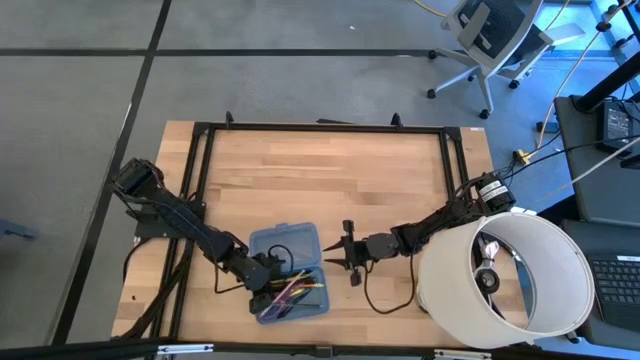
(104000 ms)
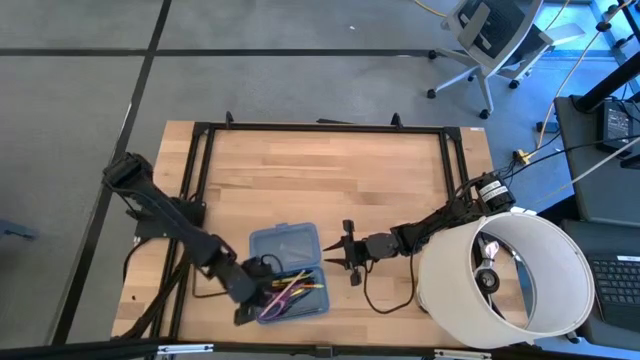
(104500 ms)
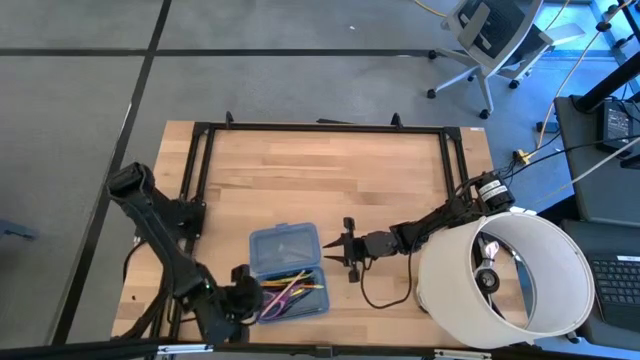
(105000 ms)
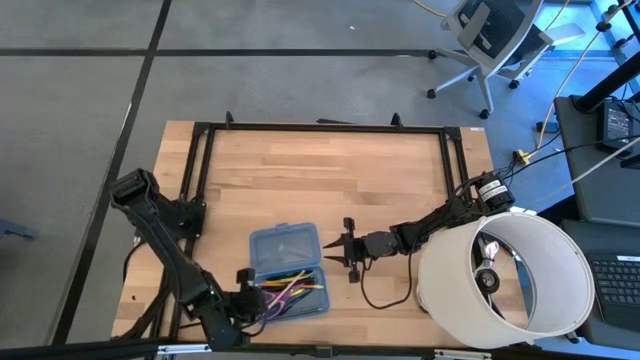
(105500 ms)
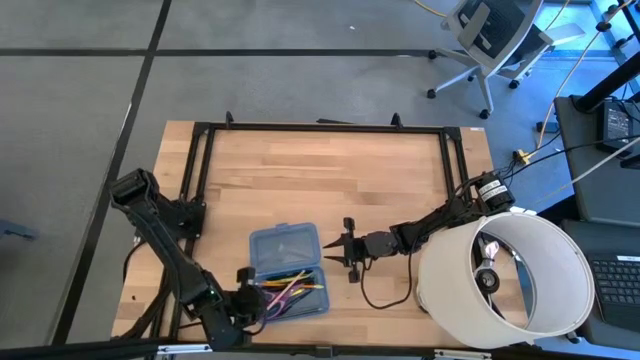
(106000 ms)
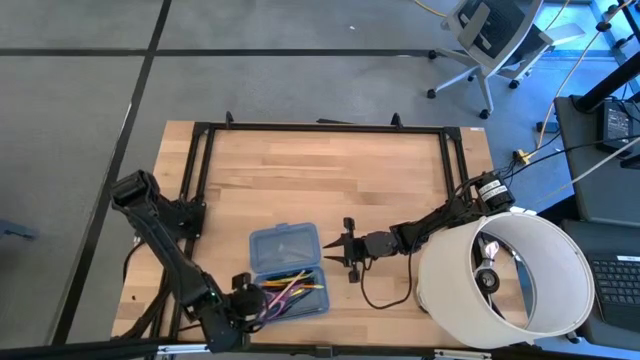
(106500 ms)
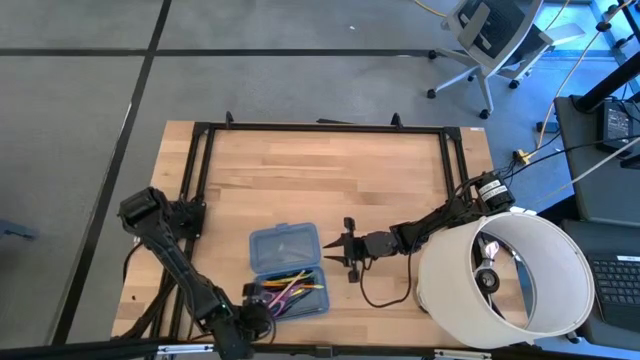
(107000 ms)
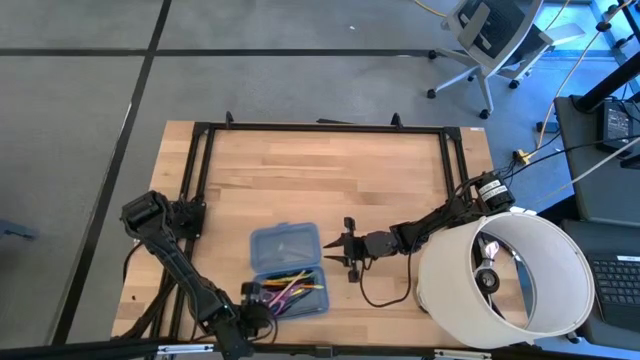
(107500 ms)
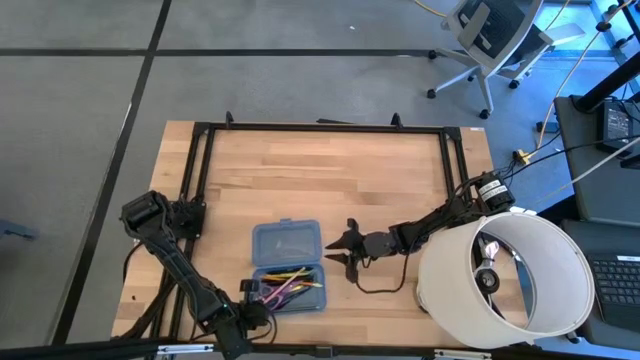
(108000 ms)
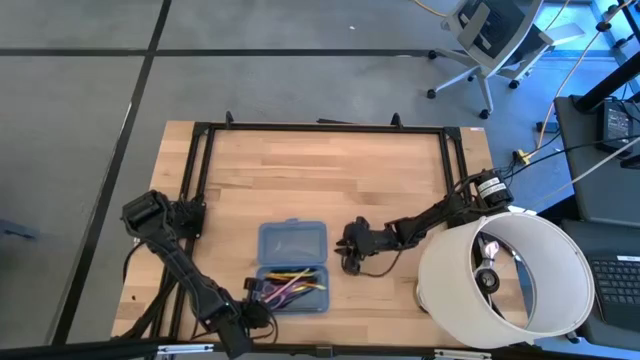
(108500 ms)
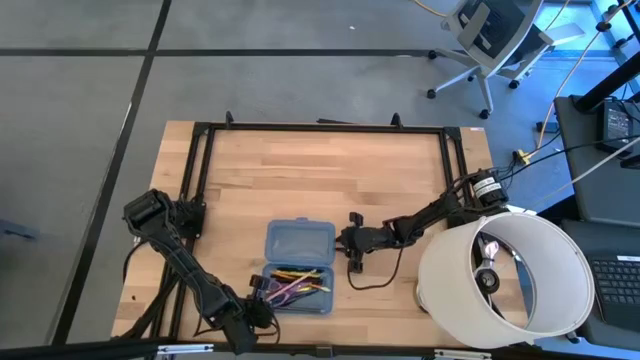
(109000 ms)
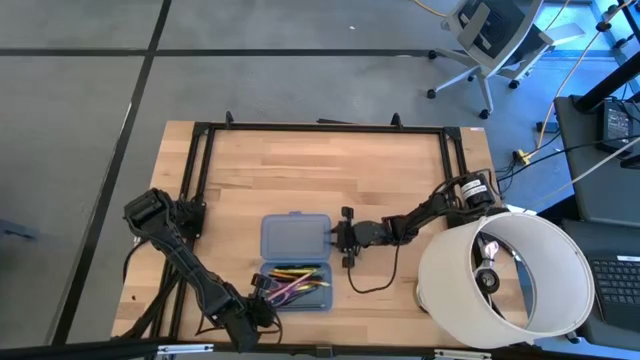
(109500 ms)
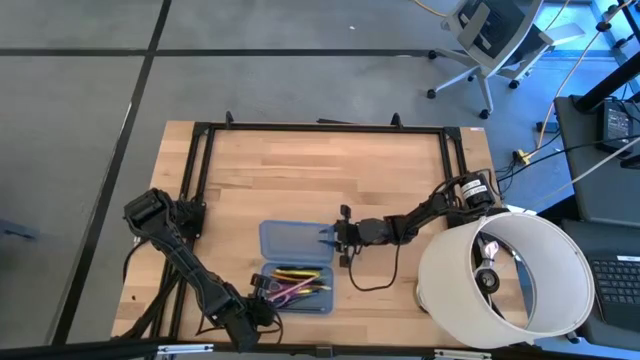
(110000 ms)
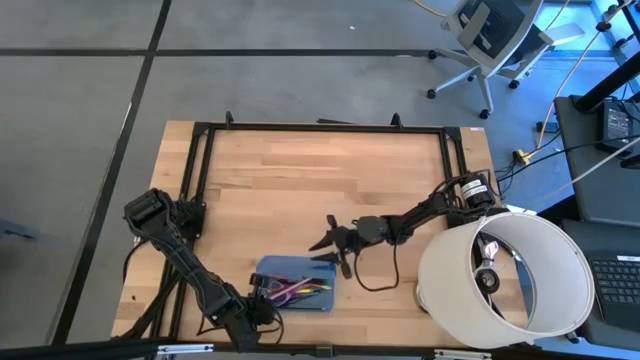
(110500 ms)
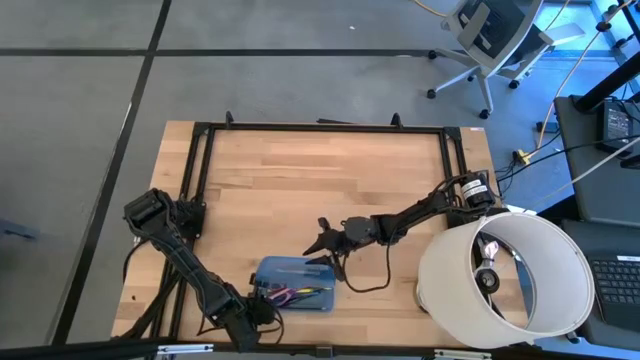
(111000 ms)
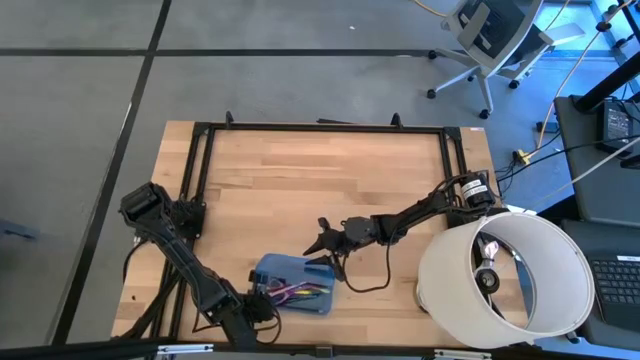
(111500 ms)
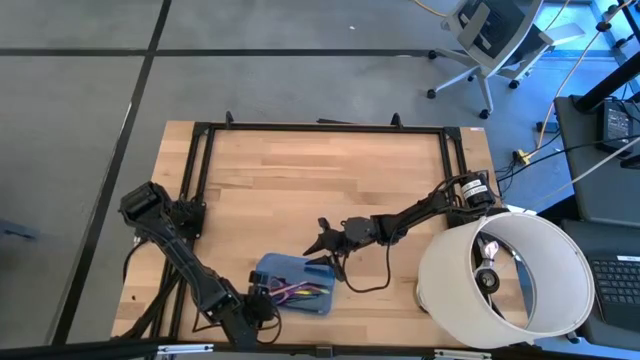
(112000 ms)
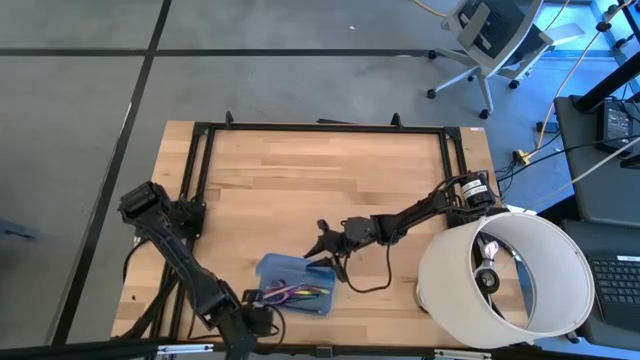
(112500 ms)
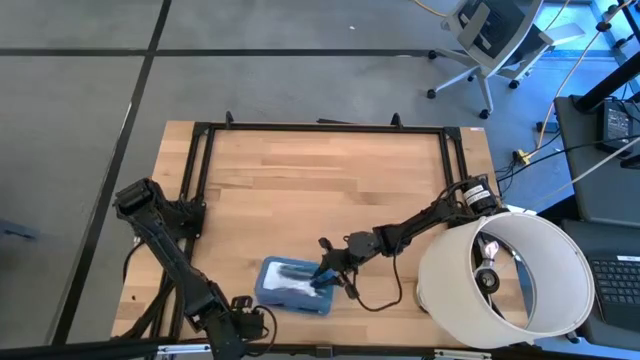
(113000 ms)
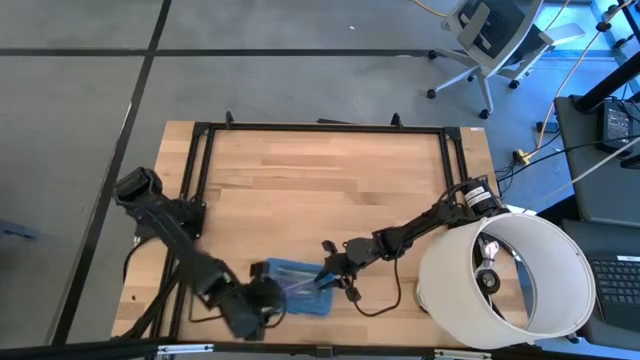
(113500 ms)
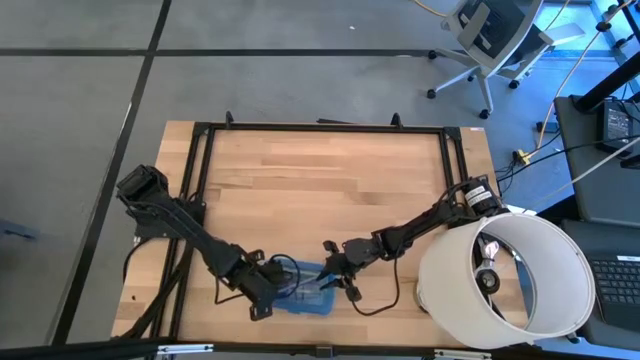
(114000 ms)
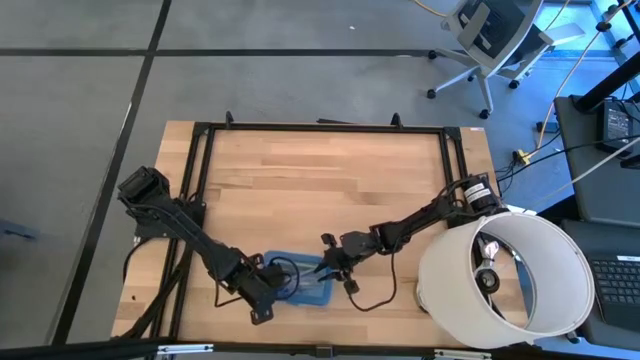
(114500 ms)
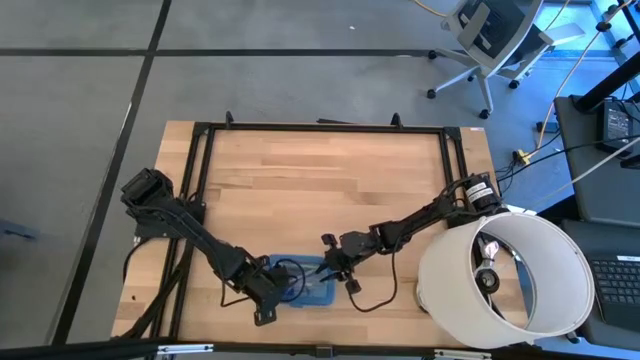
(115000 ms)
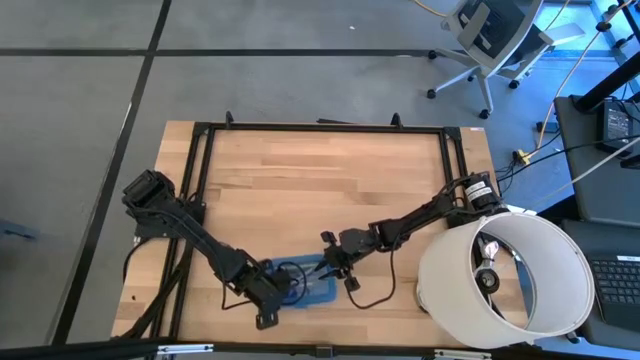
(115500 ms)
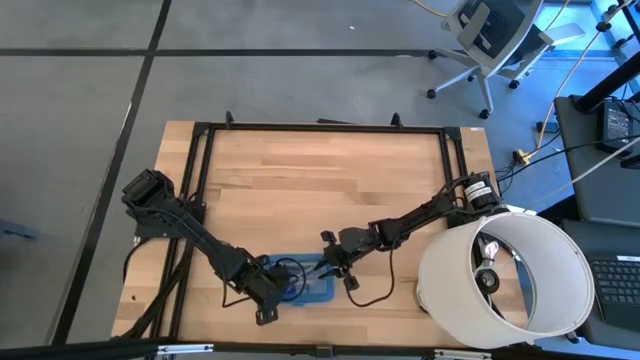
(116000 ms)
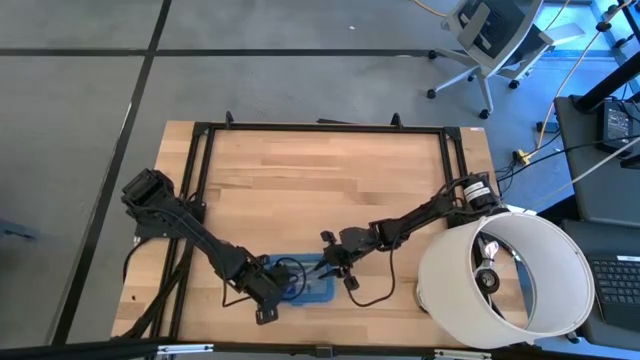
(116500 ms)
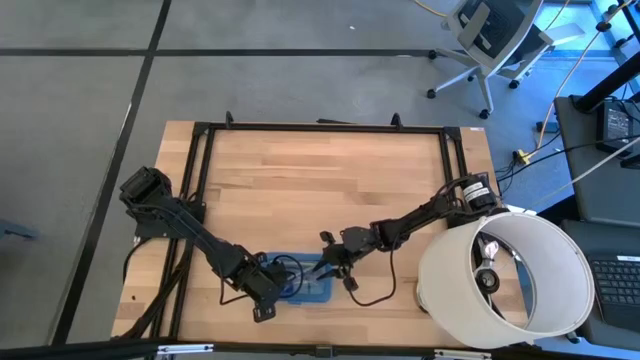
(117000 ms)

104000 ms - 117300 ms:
Task: Pick & place school supplies into a supply box
Close the blue supply box

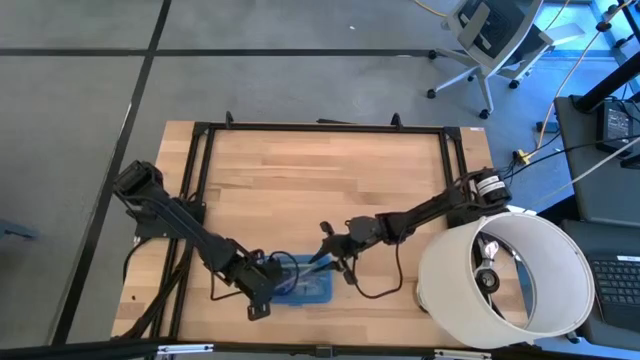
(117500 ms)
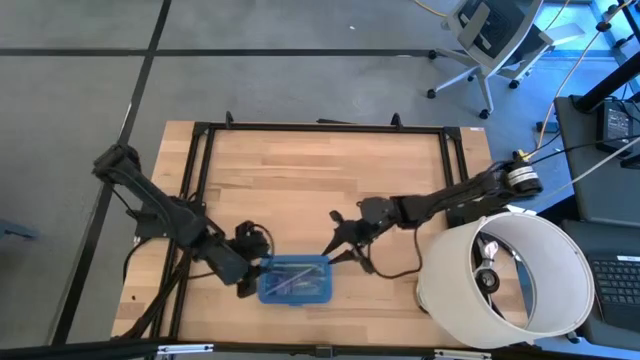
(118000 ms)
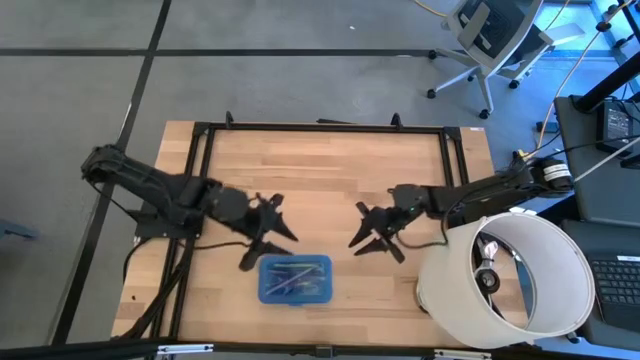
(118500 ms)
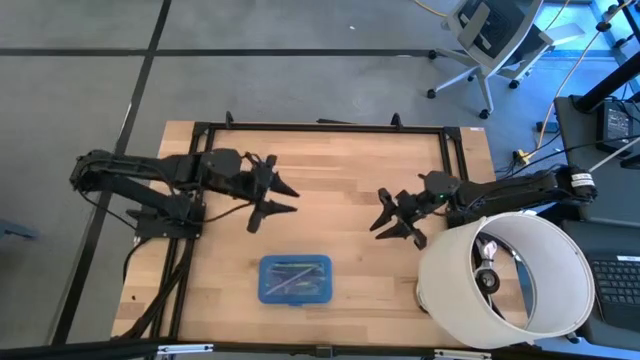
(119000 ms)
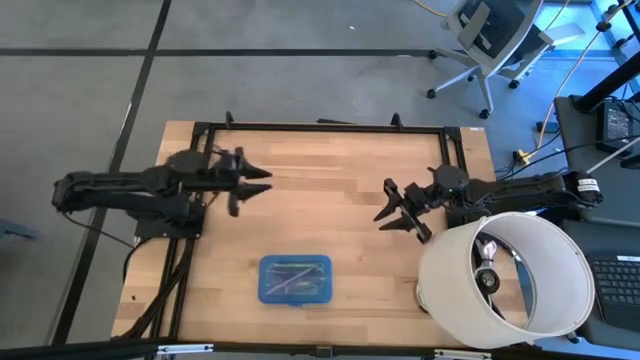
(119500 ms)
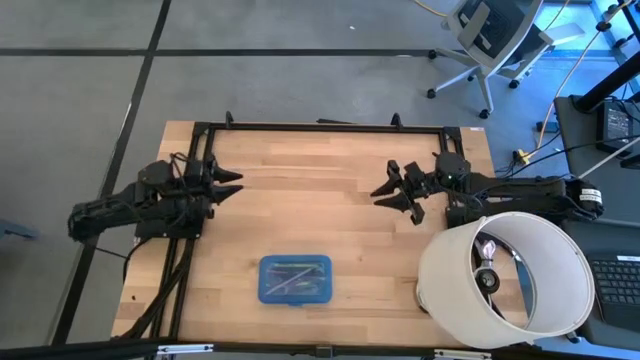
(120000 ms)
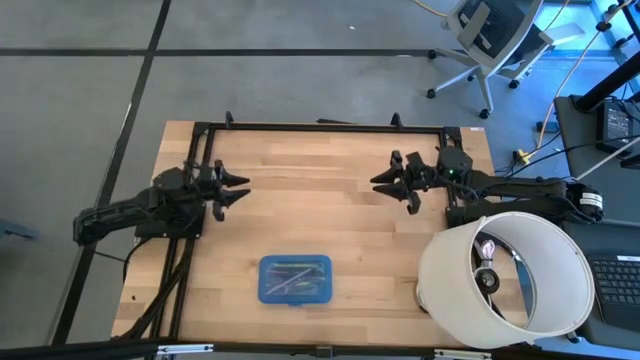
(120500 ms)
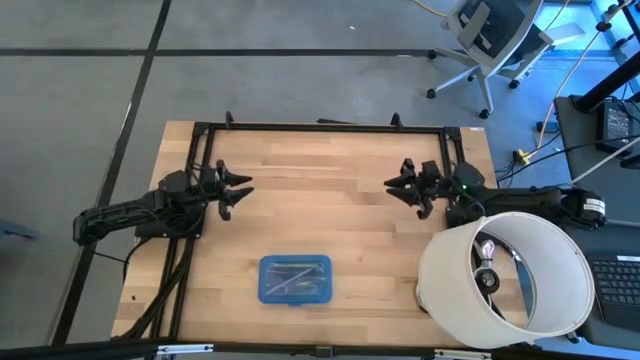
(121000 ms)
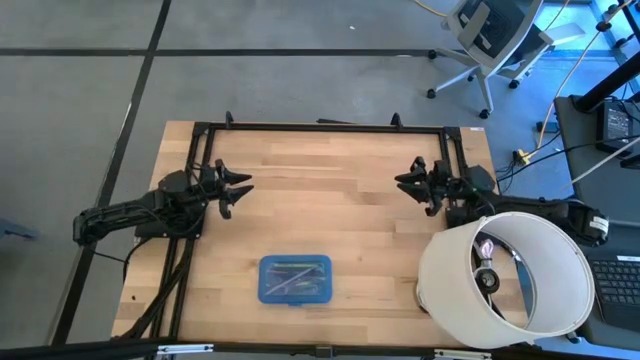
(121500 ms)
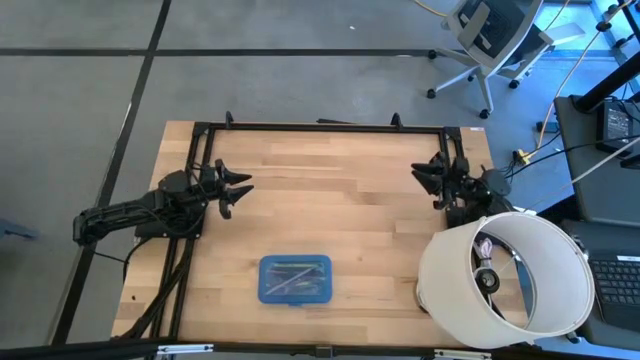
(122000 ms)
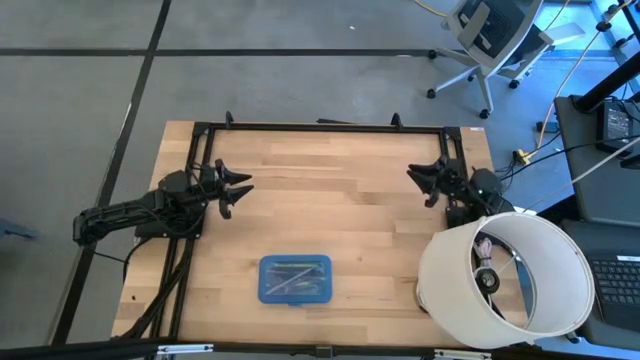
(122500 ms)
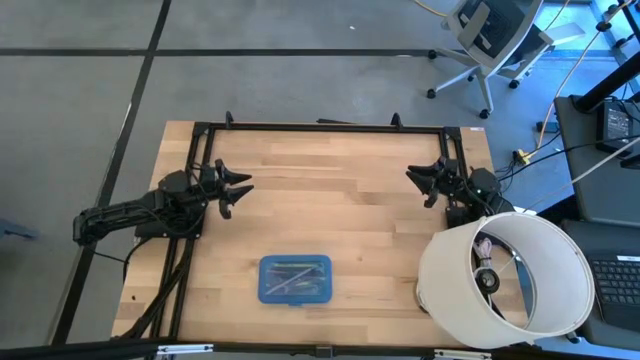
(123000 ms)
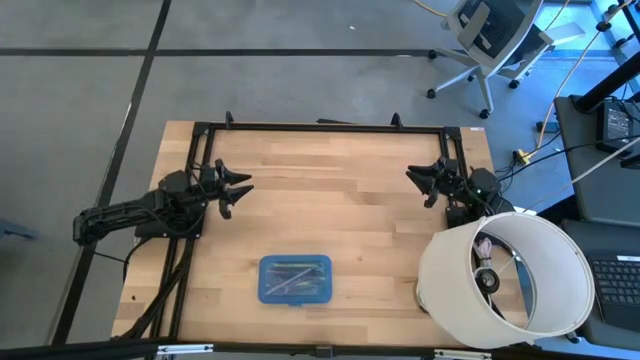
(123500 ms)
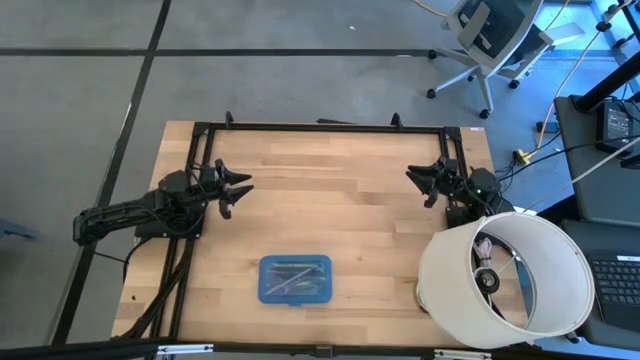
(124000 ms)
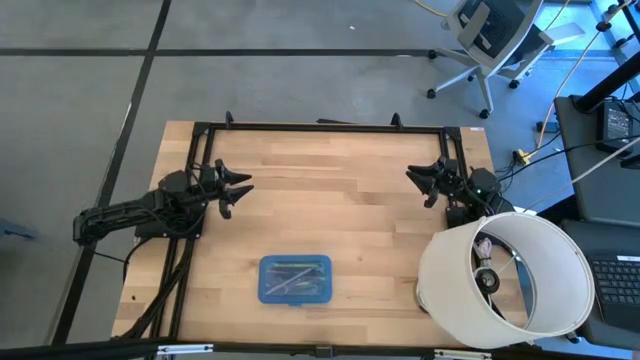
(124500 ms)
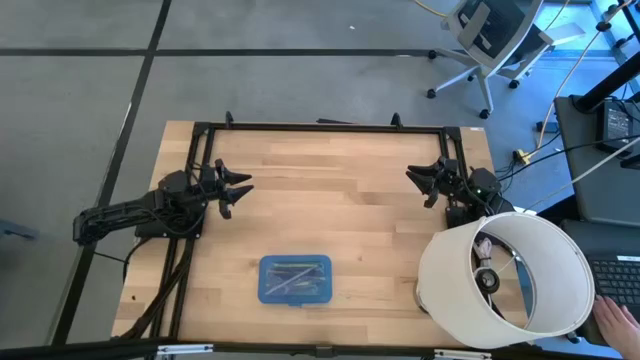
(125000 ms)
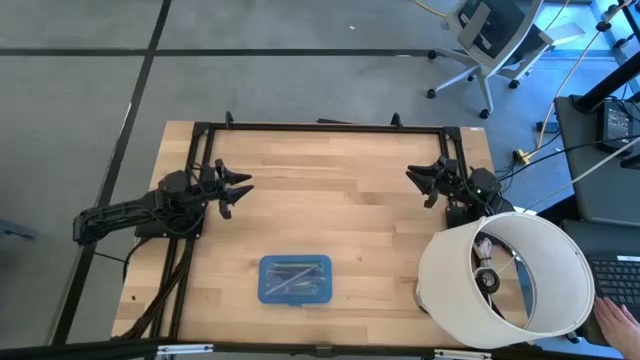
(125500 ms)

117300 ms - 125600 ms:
Return to Home Position

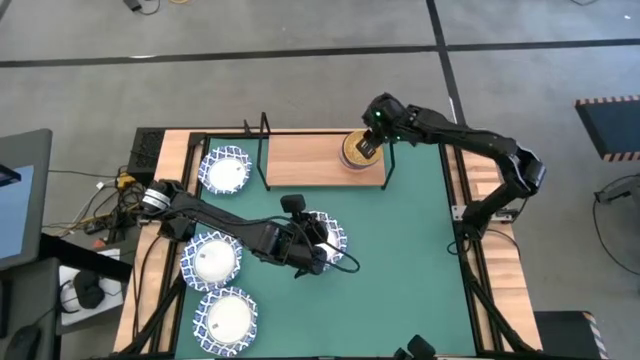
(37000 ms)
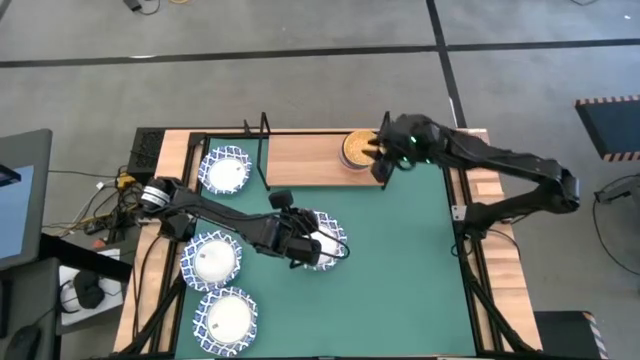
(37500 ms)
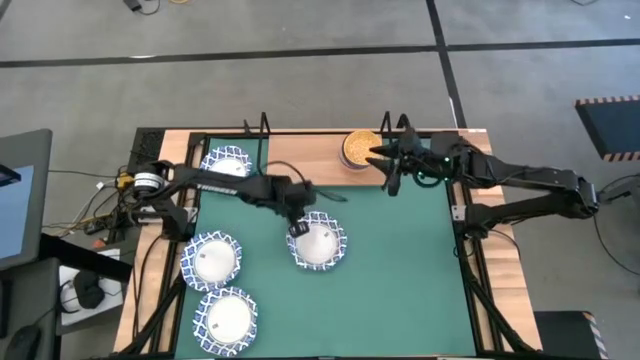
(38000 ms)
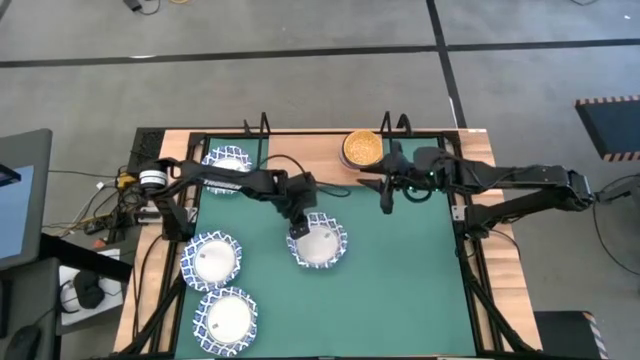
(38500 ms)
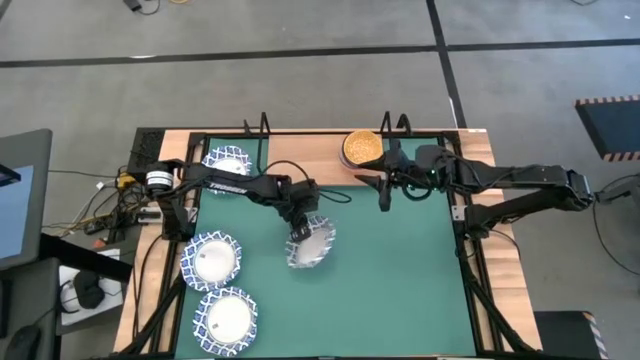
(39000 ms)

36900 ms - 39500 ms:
Task: Place and stack bowls onto a shelf
Put the white patterned bowl on the shelf
